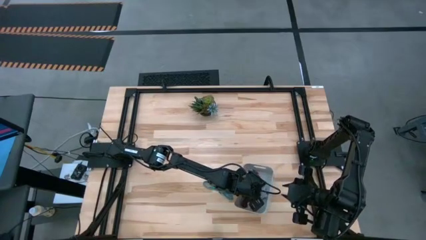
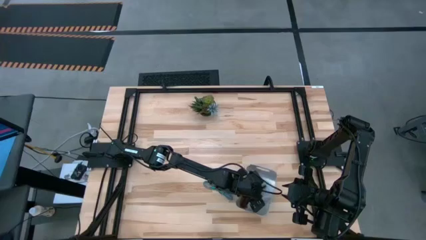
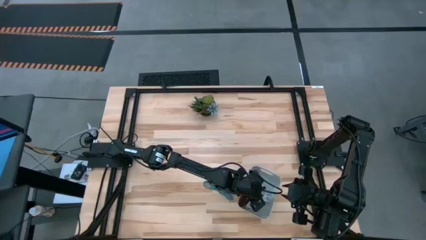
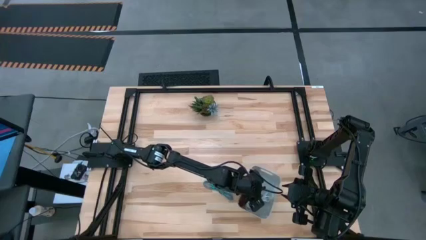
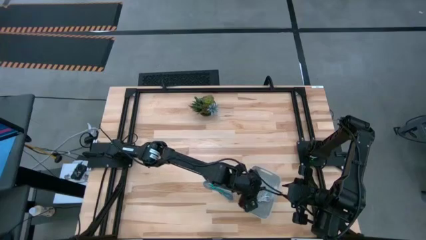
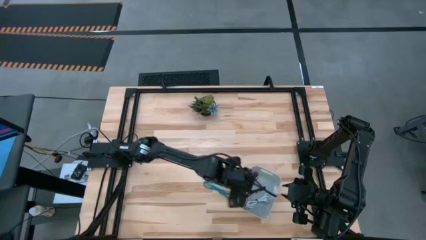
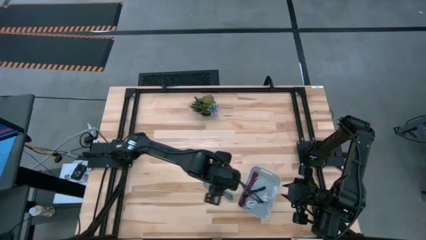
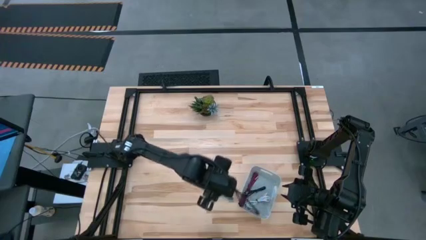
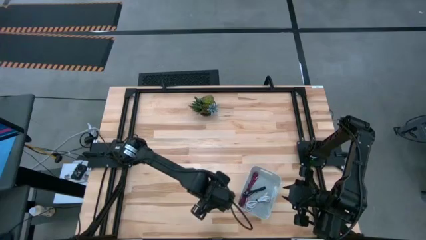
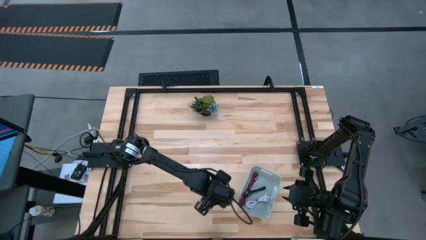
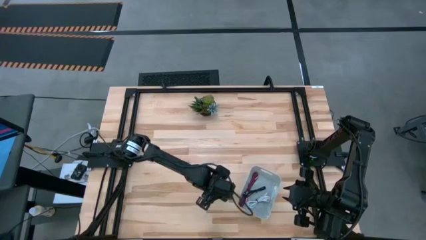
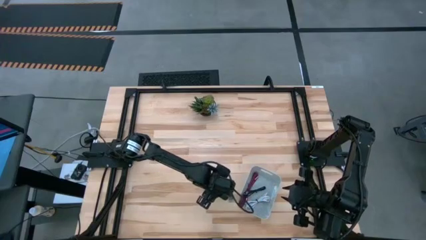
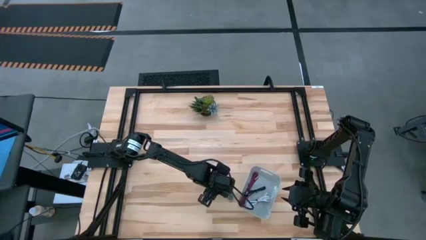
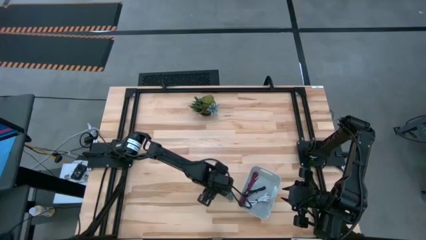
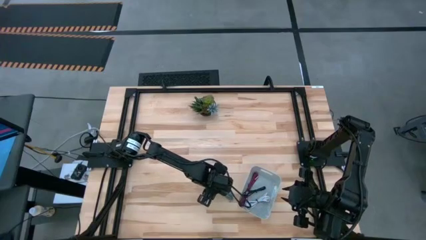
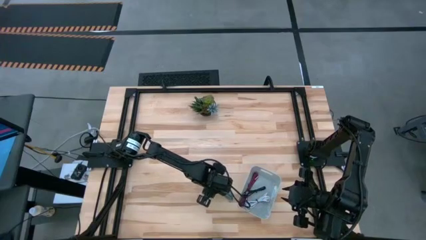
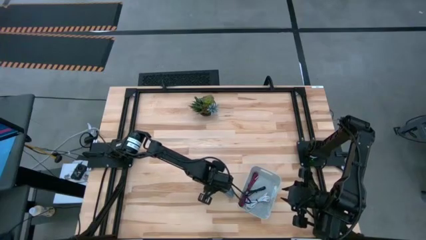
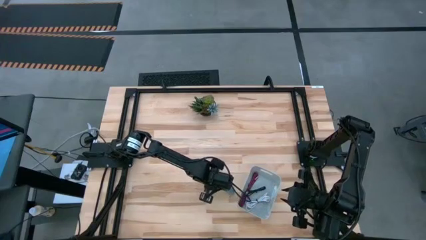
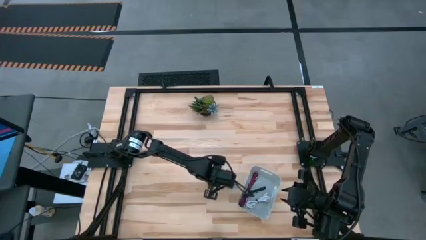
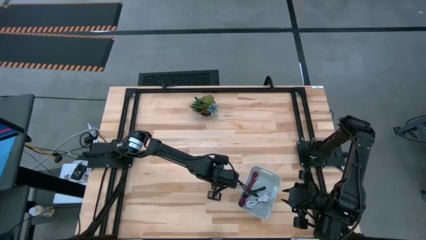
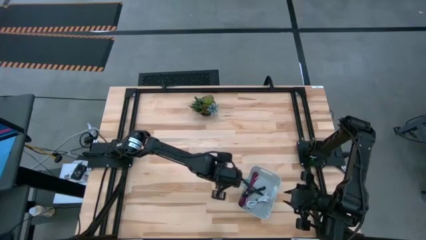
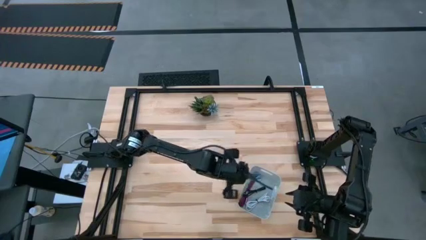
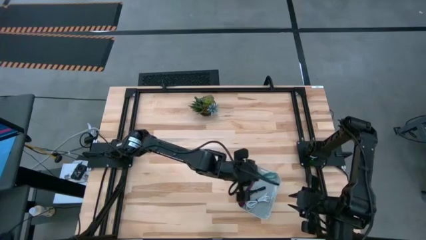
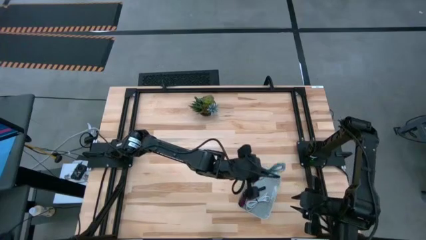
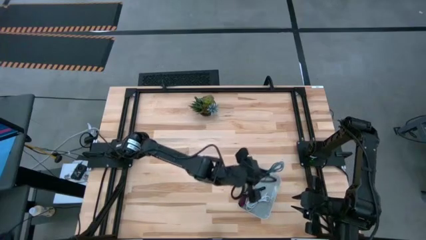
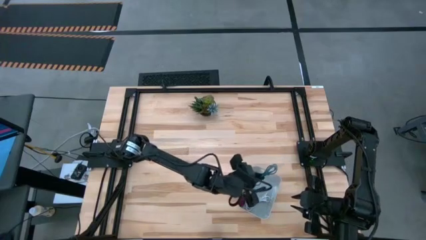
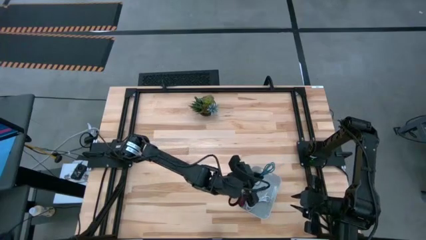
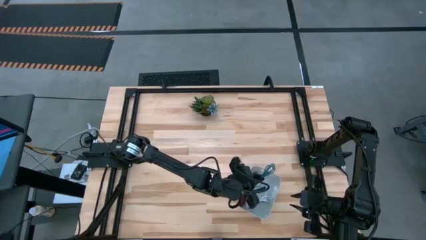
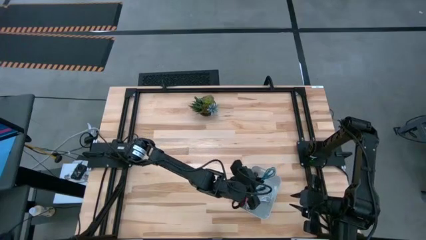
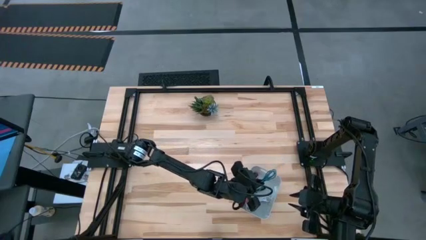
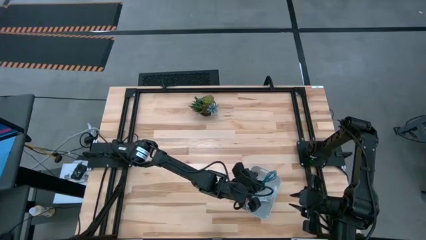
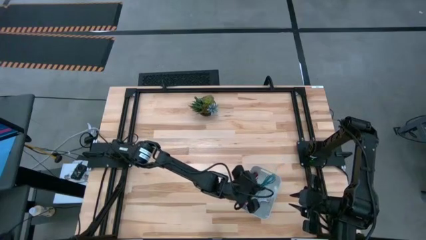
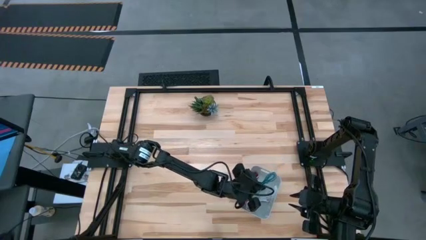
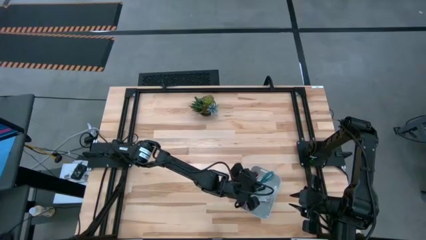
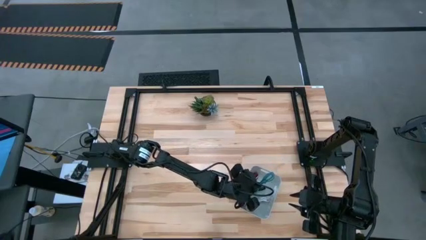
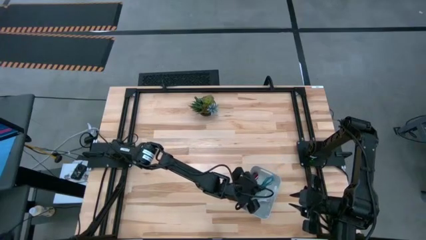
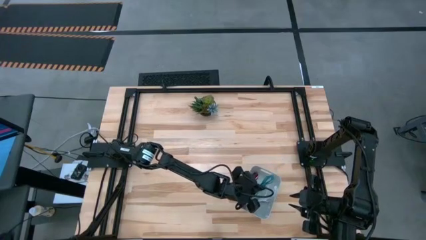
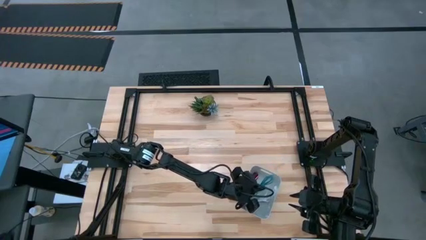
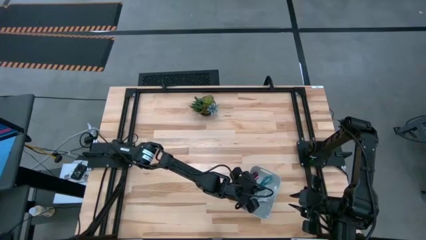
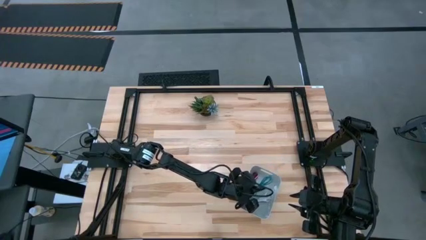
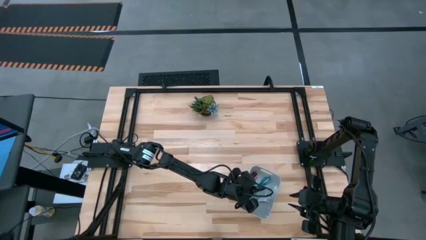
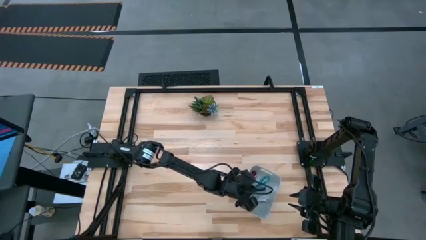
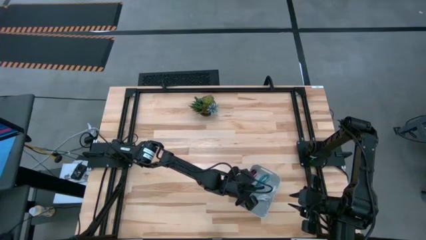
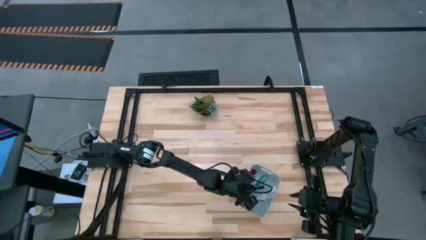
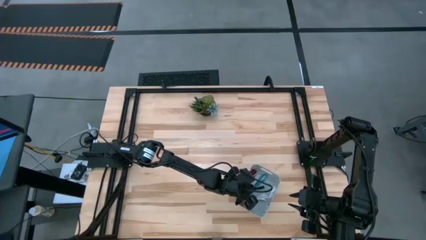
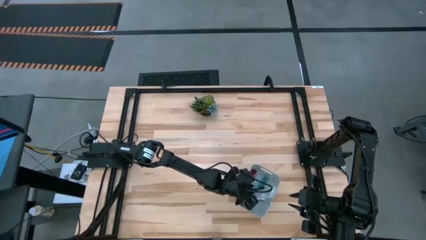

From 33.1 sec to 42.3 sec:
Task: Pick and place USB-C Cables
Put the blue charger cable into the white bin

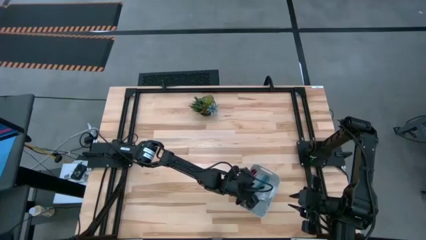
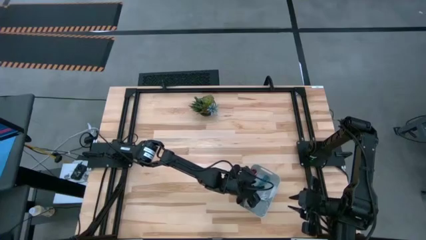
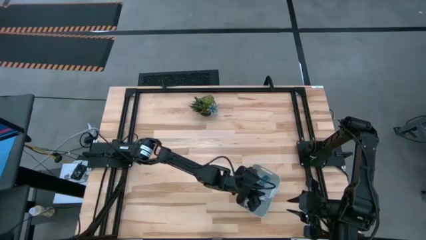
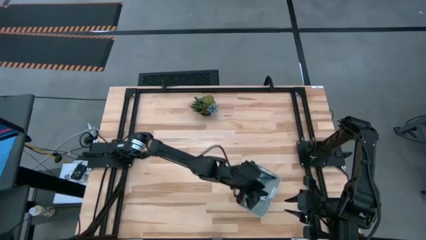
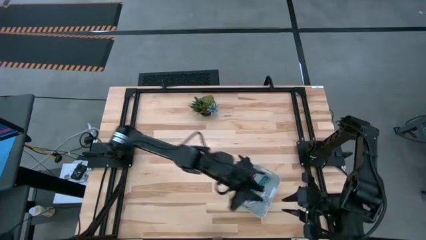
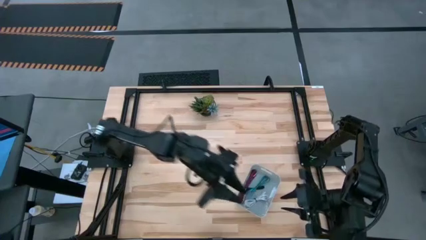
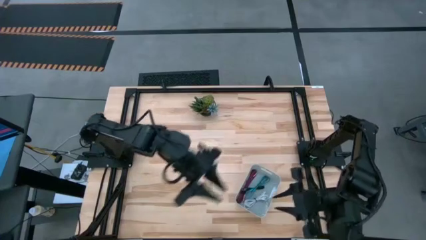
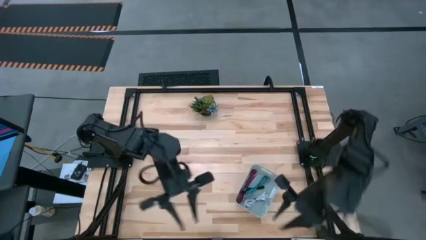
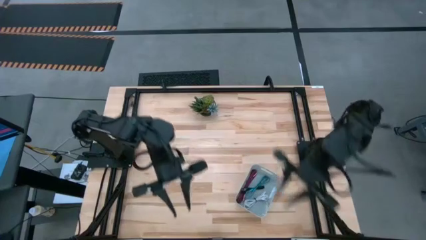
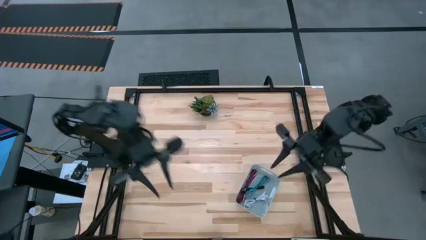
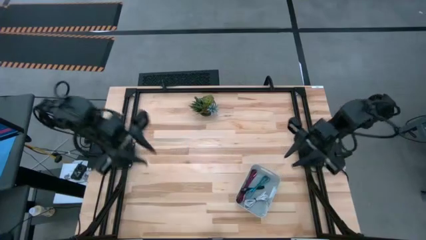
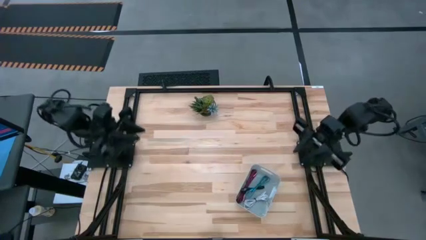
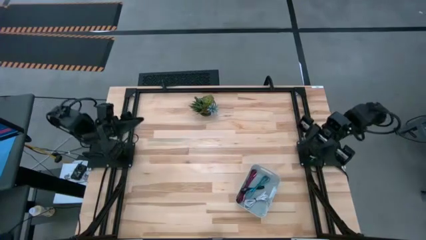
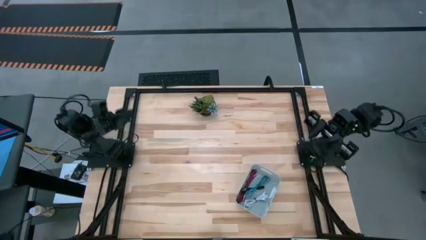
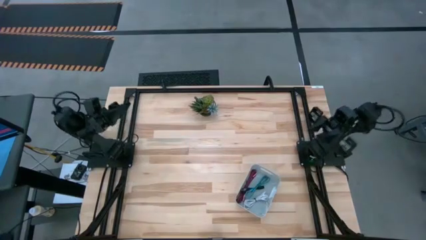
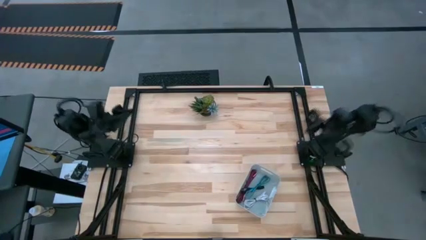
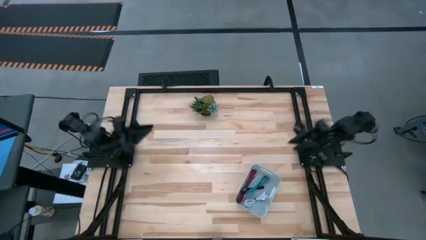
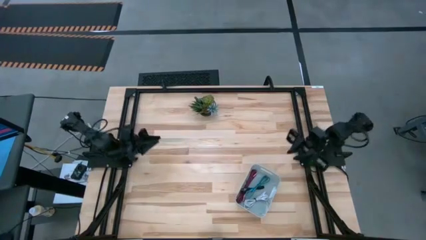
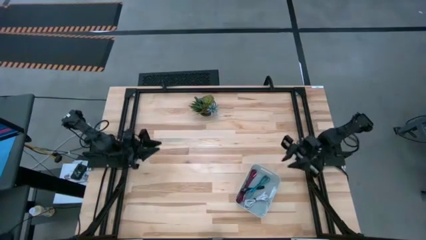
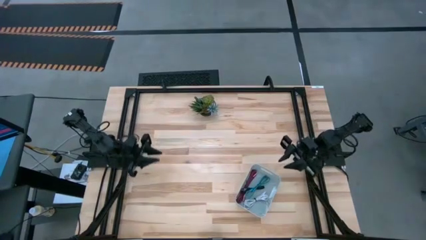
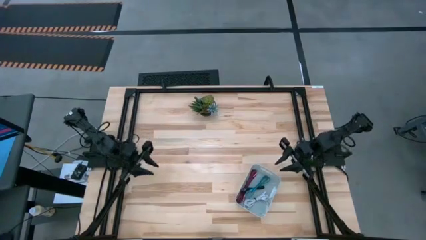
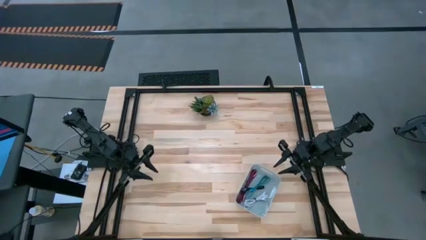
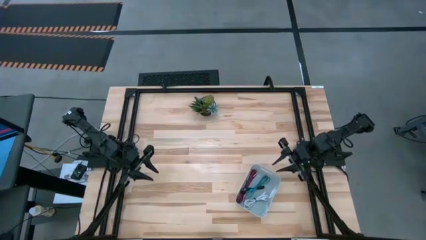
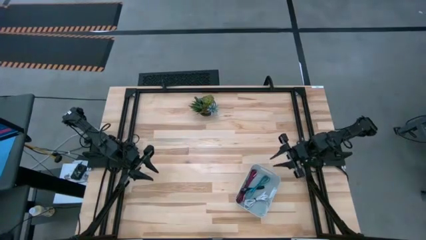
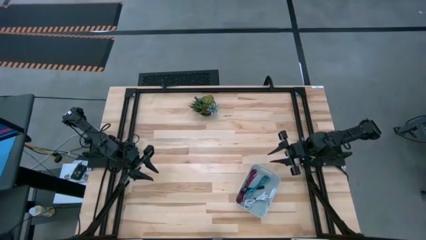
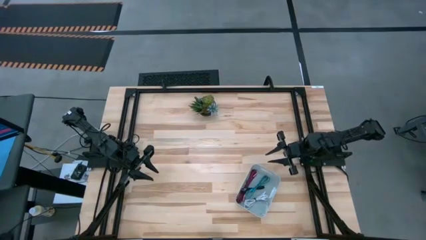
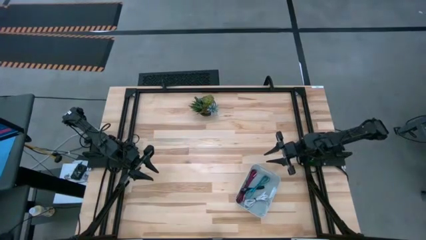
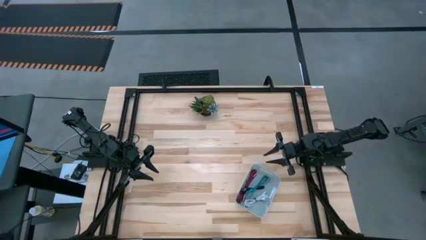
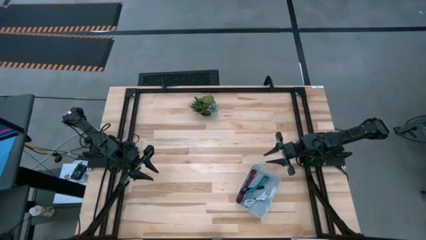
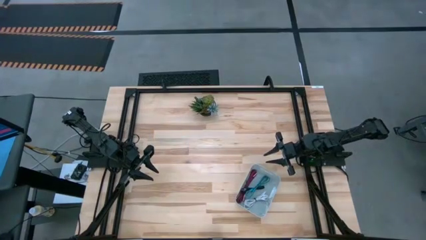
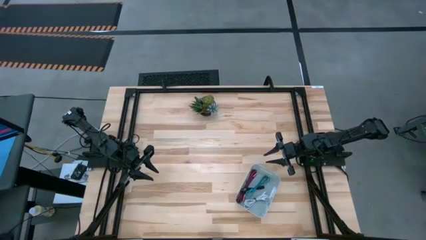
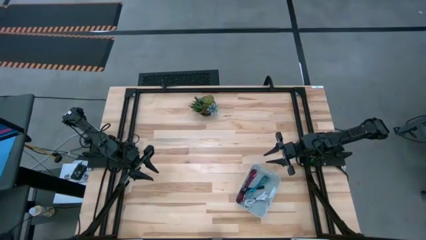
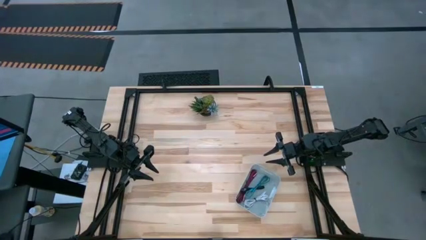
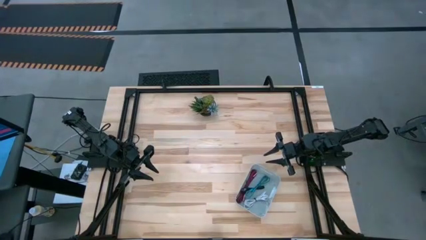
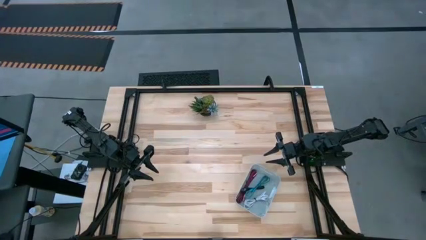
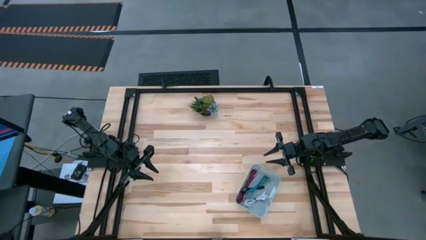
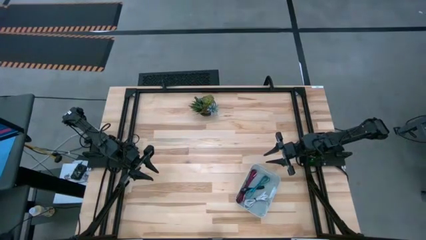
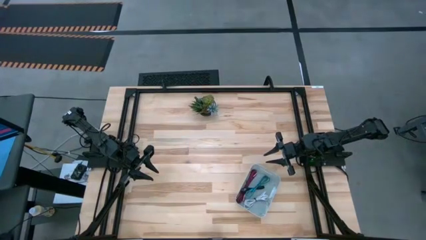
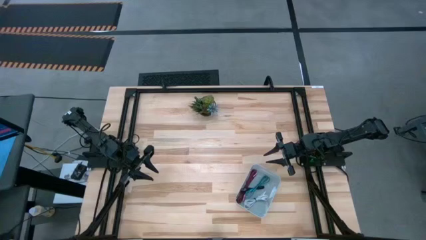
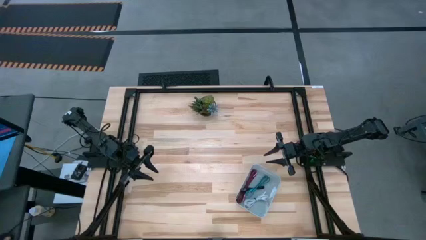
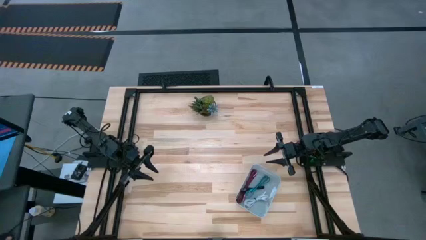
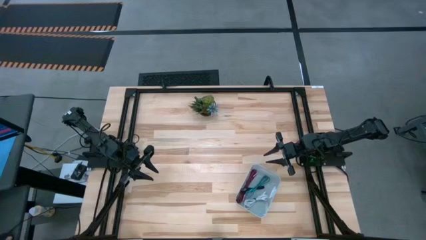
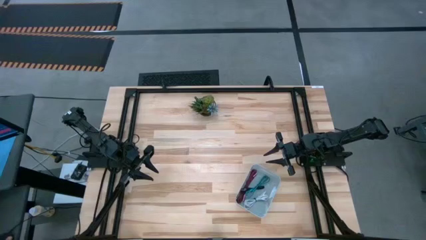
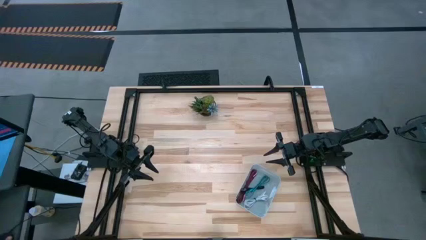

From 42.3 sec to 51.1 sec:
Return to Home Position
